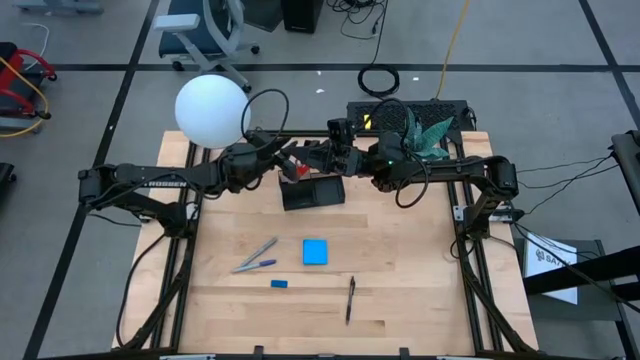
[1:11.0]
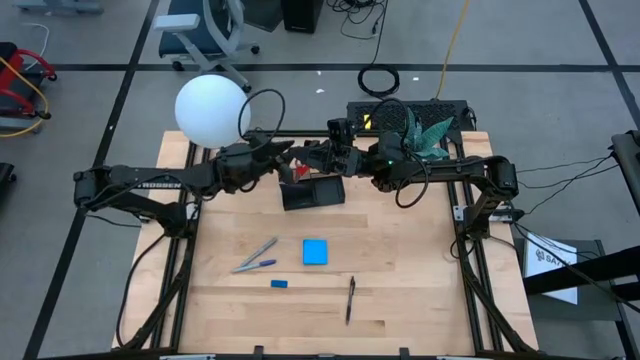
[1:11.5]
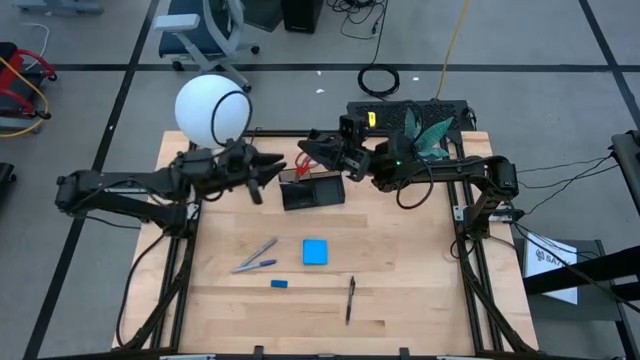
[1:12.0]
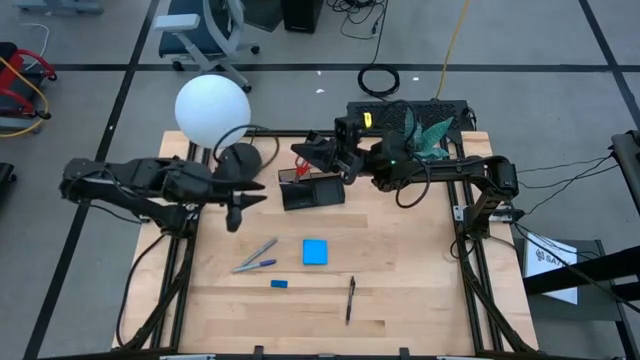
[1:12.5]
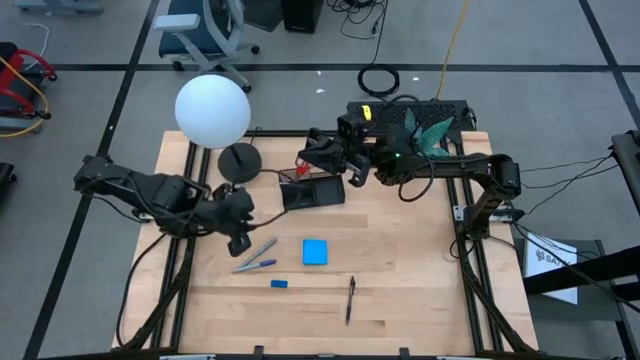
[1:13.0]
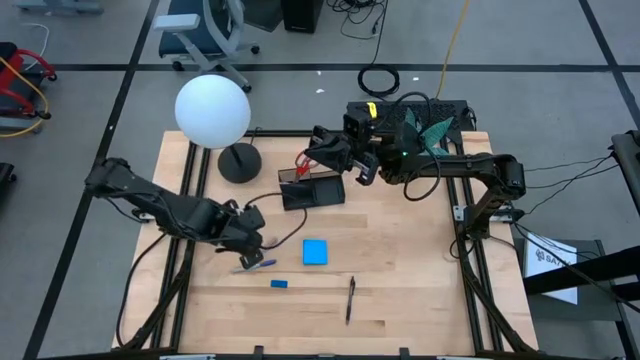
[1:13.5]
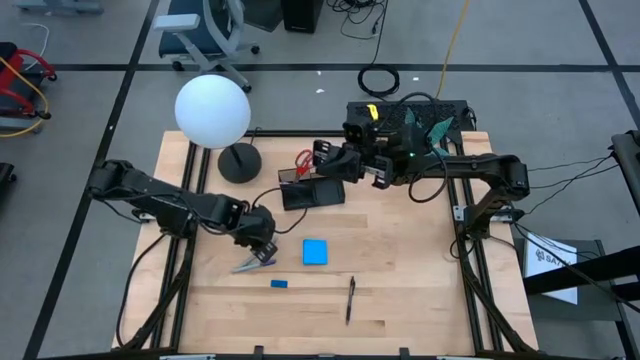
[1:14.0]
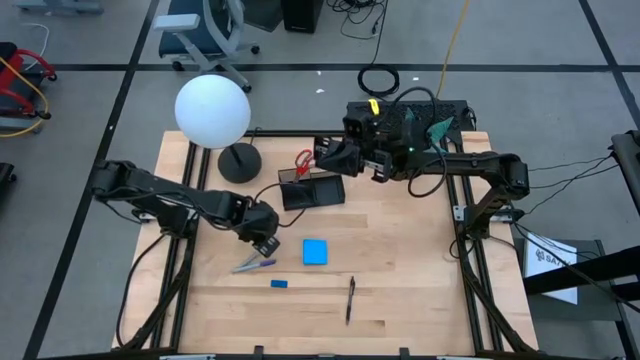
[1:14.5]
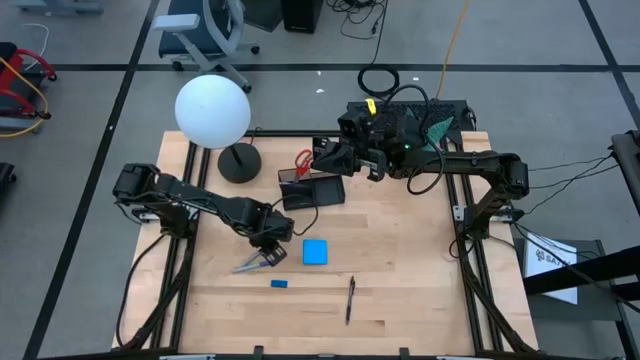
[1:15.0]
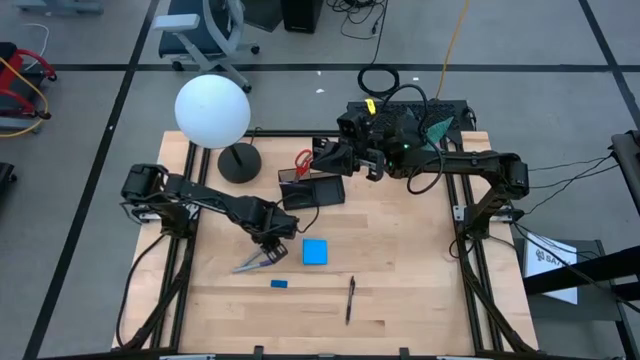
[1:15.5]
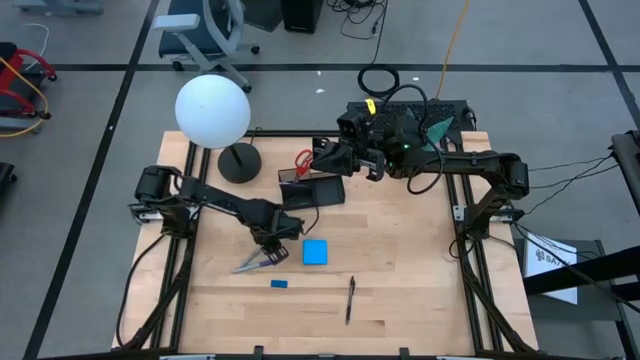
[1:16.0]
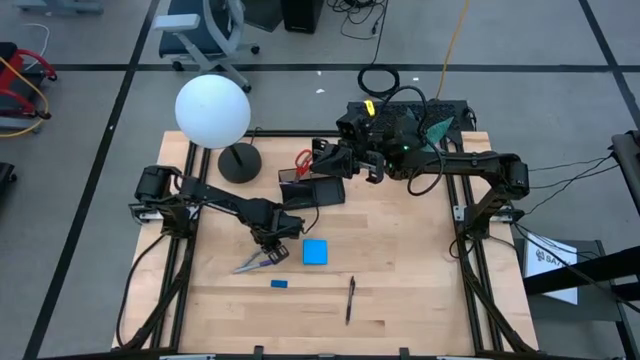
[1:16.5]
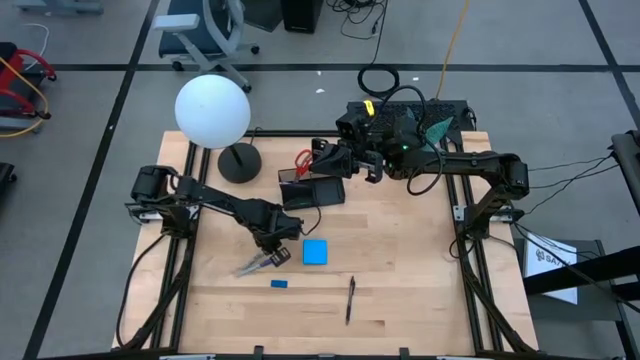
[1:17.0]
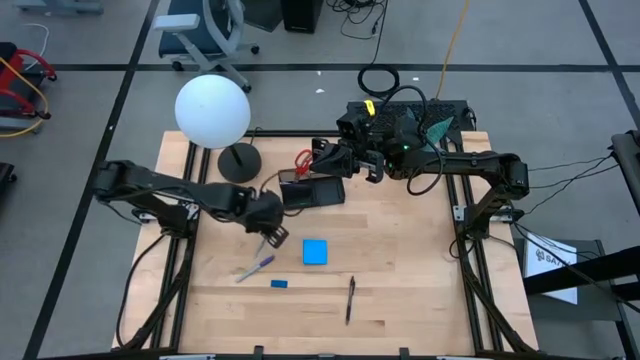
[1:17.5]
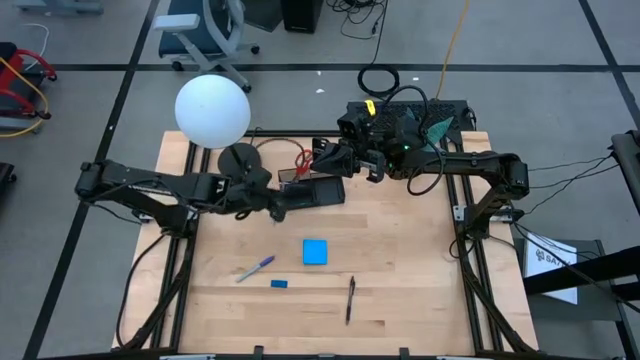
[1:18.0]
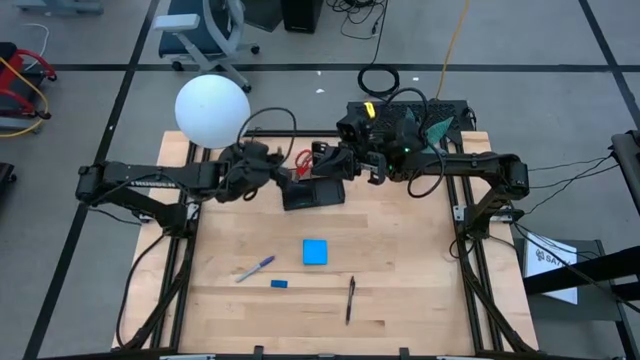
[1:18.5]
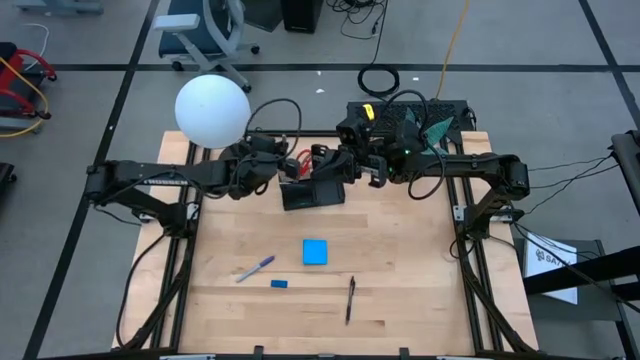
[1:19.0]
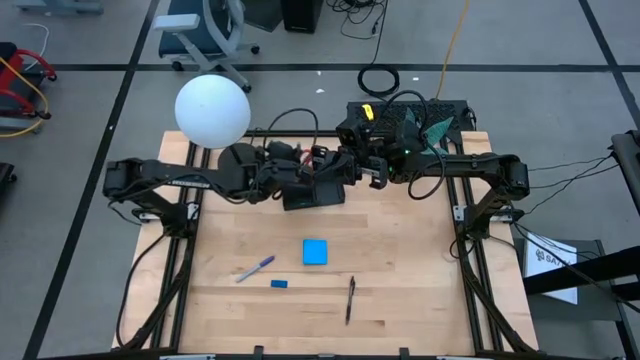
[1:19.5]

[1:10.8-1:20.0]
Task: Pick and place office supplies into organizer
Put the gray pen into the desk organizer

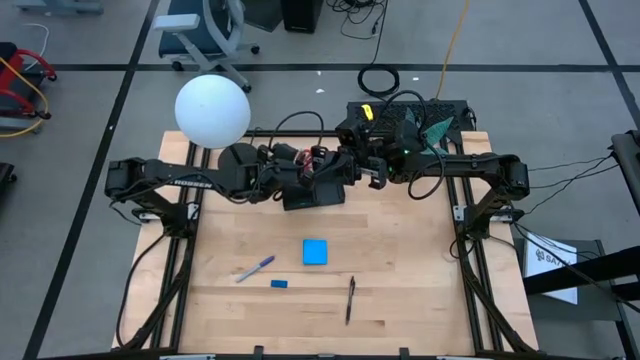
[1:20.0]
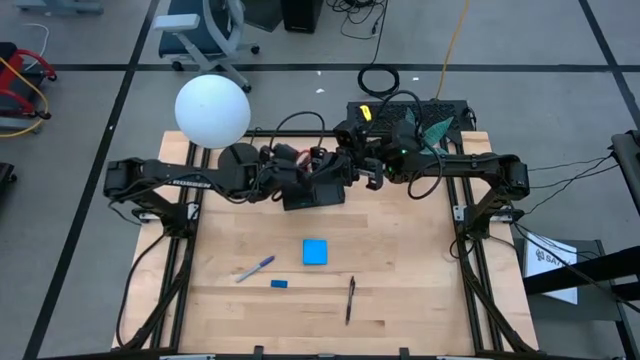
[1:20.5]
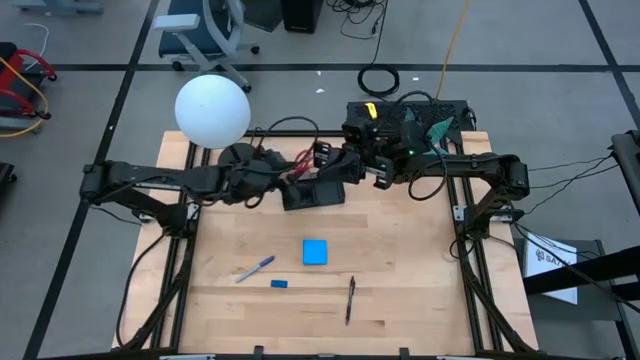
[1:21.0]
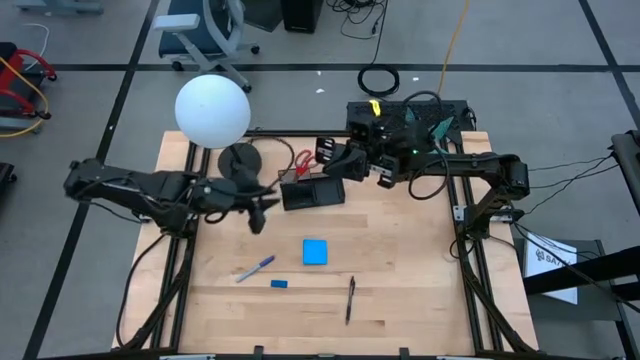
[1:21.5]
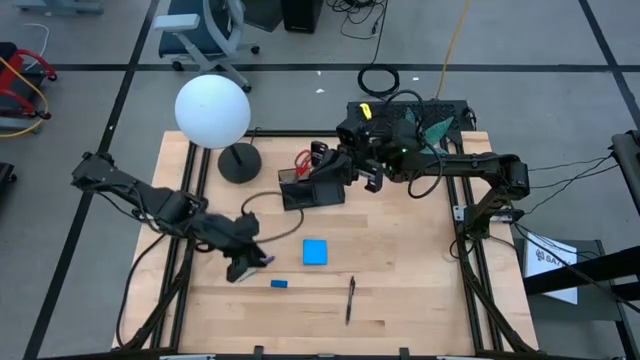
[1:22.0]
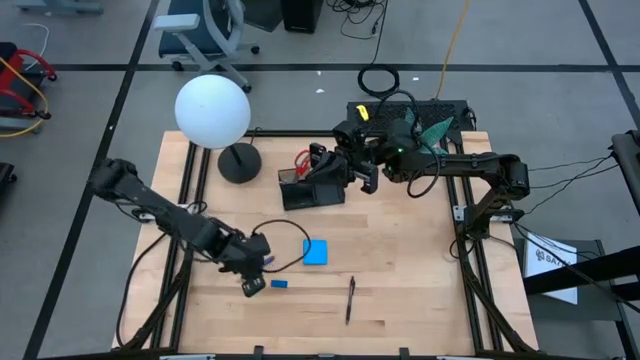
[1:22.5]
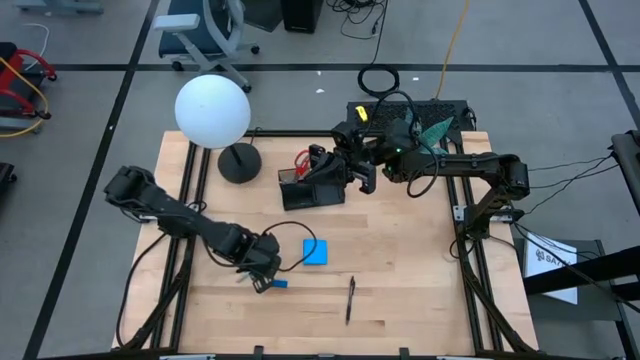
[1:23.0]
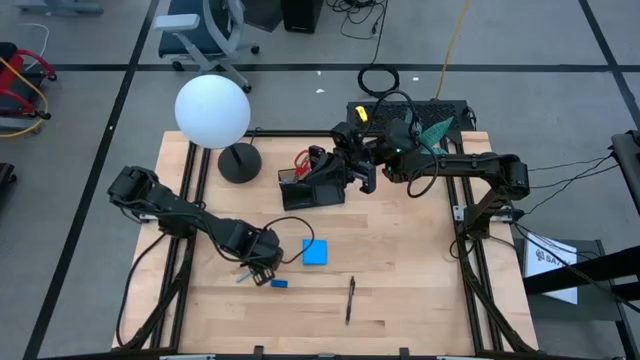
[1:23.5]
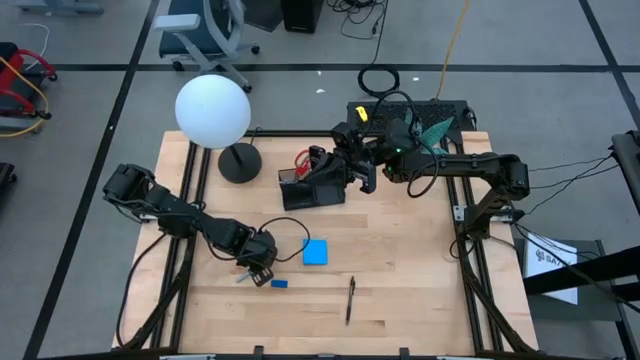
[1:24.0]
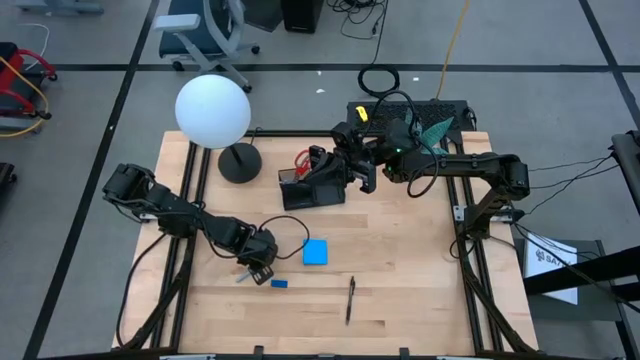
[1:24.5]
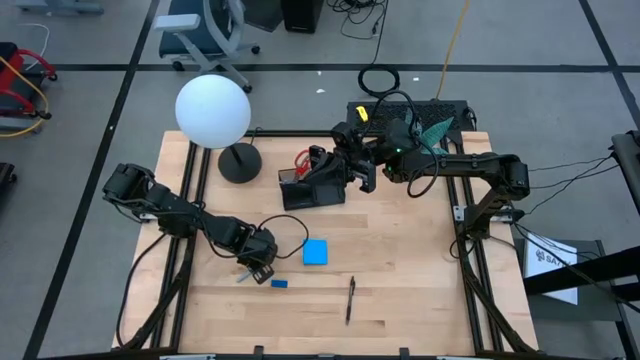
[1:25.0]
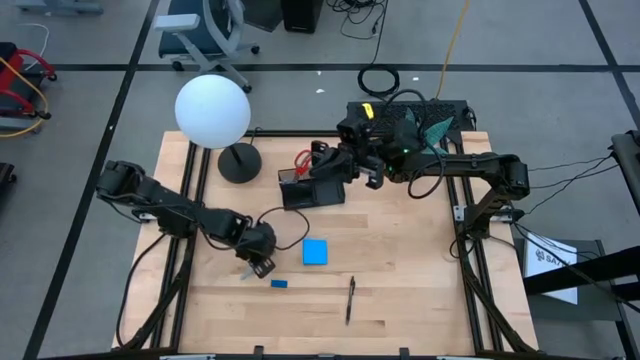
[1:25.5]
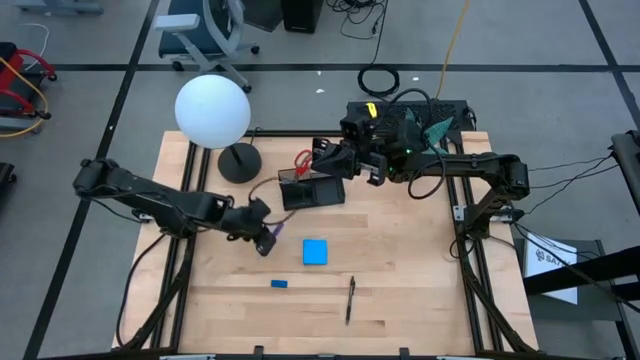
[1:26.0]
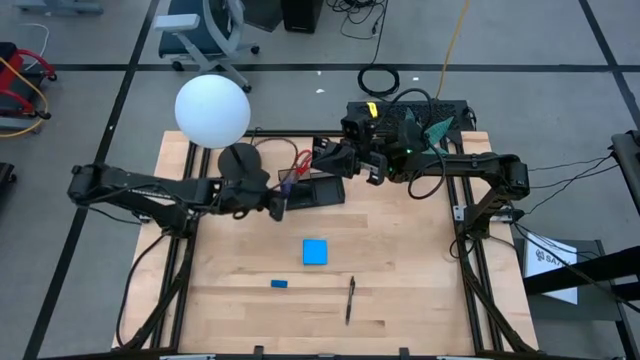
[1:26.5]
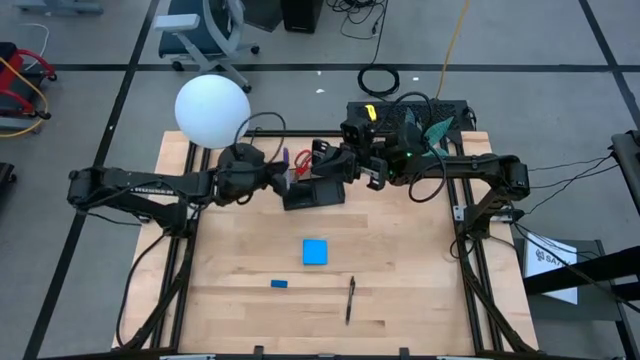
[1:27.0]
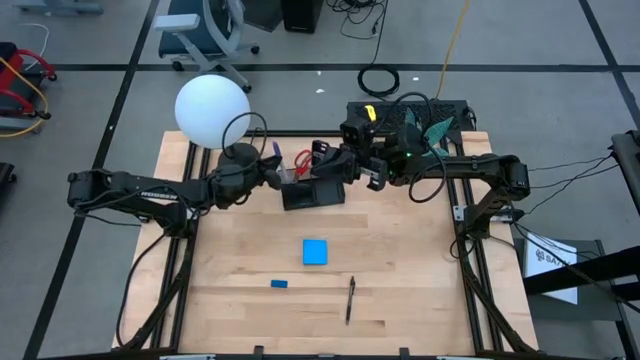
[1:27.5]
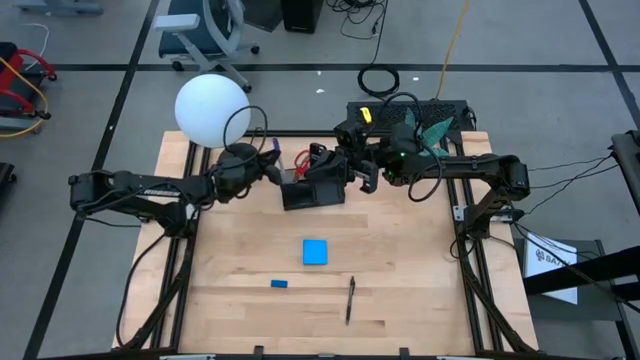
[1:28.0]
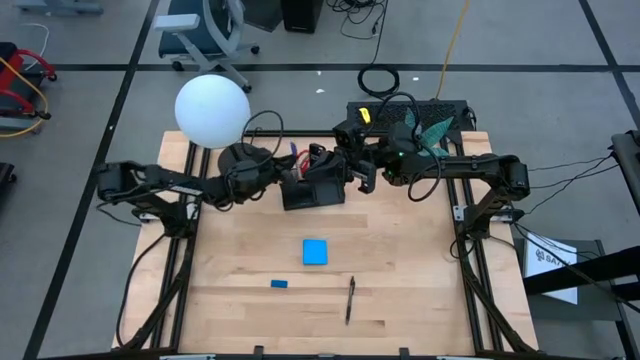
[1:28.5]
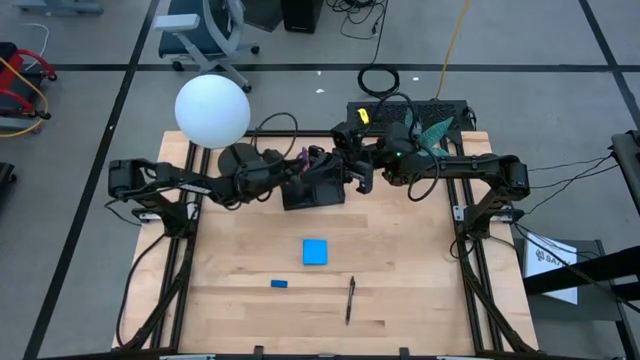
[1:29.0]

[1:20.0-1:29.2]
Put the blue pen into the desk organizer

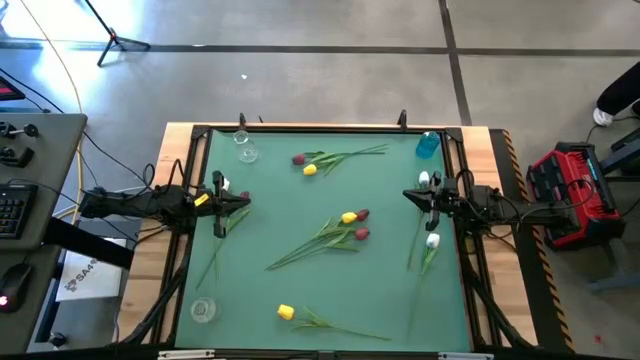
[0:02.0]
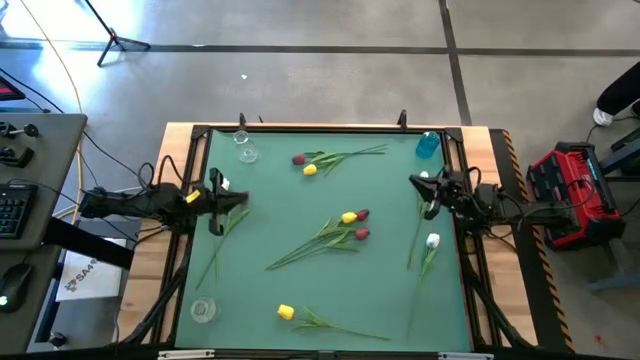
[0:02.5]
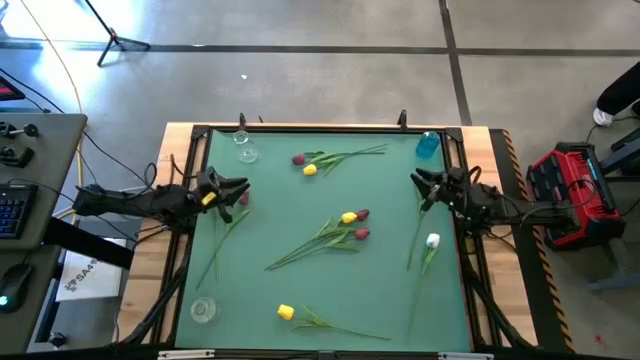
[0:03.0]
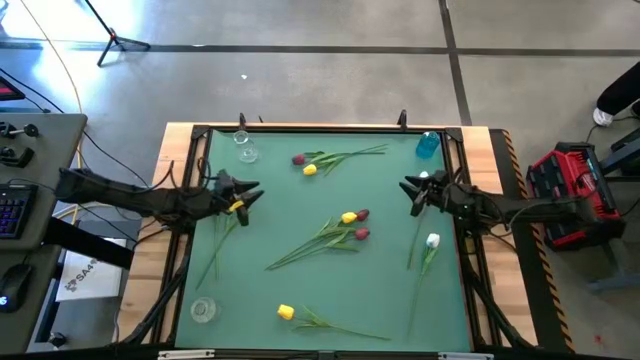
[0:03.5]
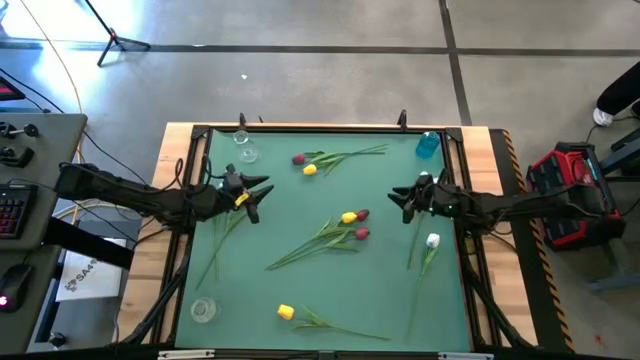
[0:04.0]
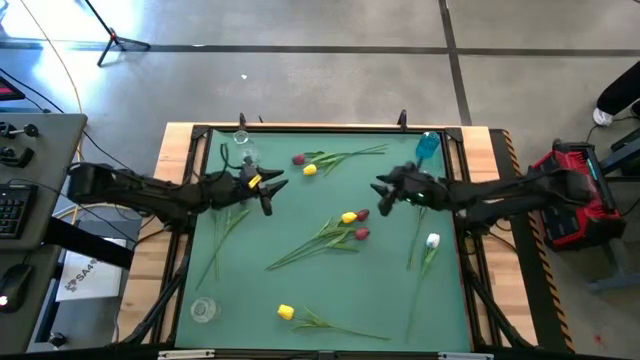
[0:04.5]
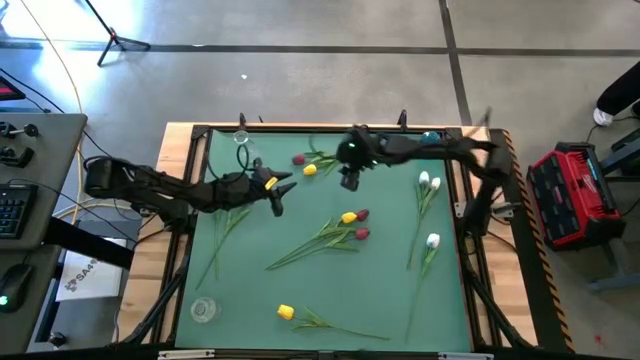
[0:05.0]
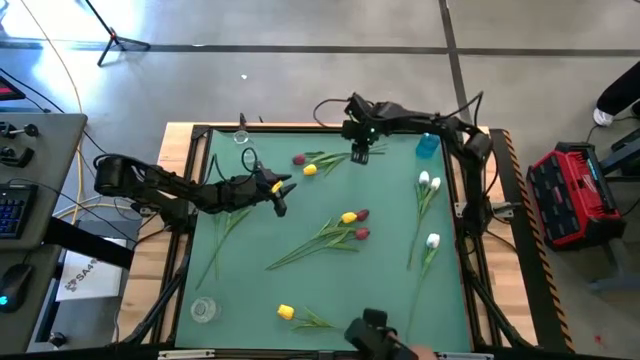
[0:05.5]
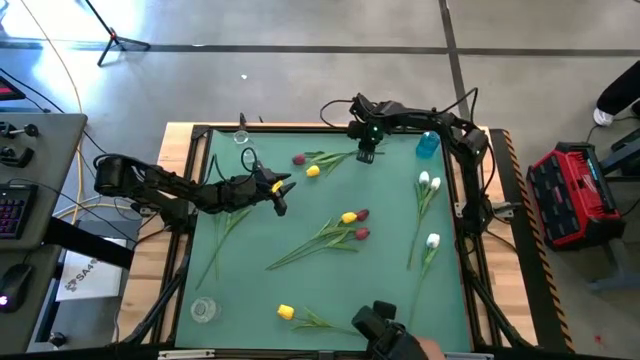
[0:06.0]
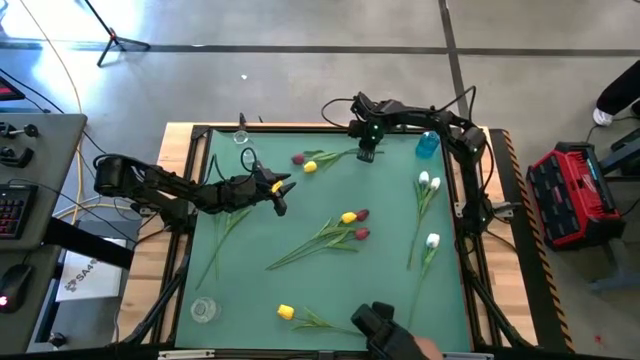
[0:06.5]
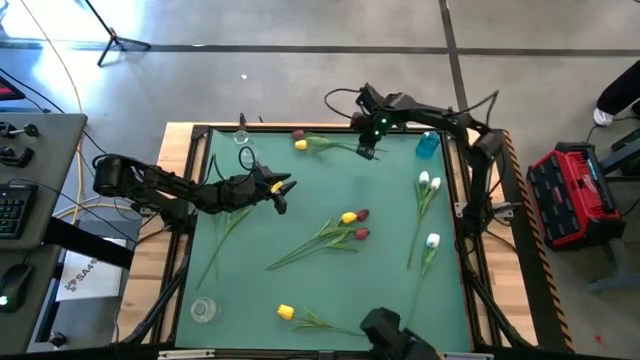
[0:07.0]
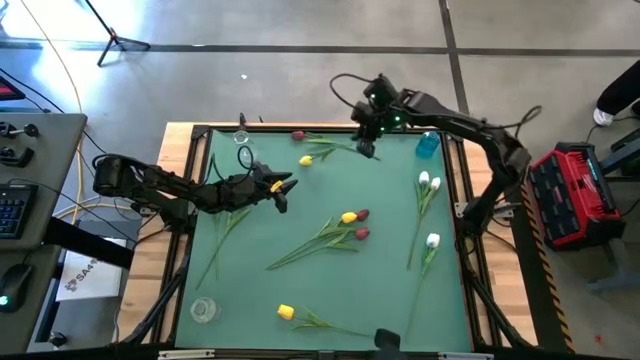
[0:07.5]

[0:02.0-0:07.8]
Task: Sort flowers into vase by color
Put the top yellow tulip into the top transparent vase
